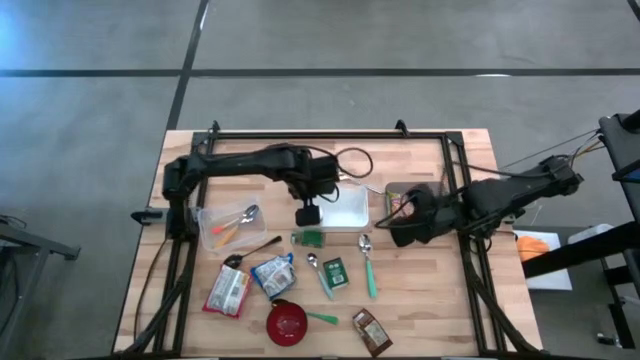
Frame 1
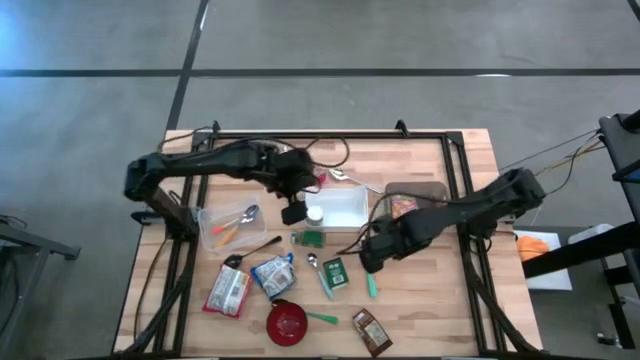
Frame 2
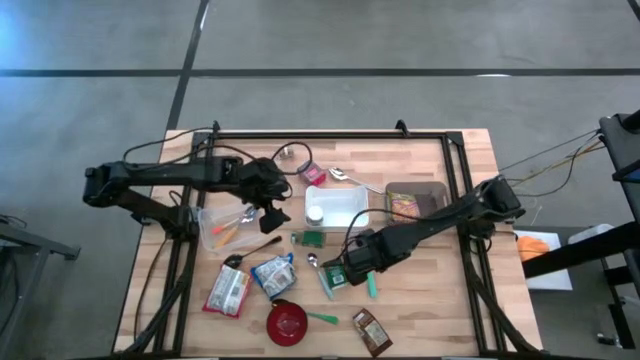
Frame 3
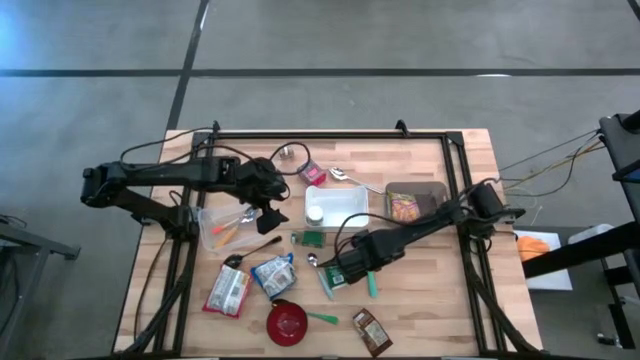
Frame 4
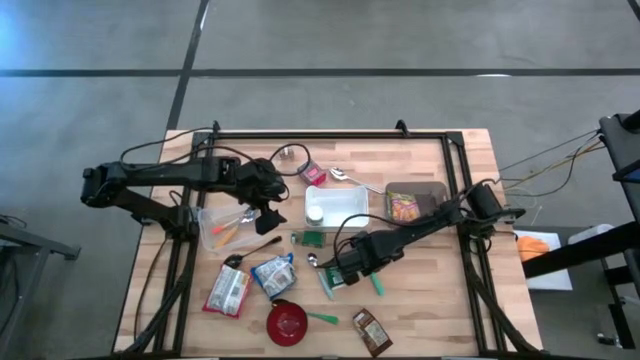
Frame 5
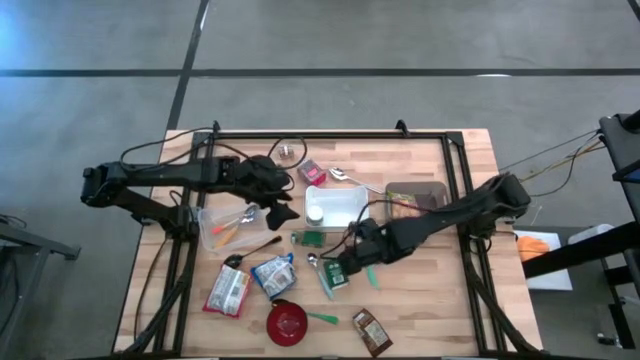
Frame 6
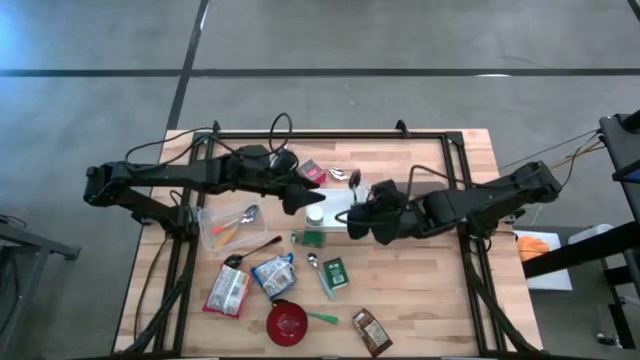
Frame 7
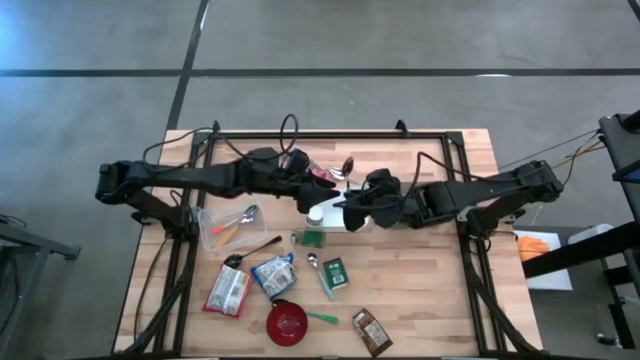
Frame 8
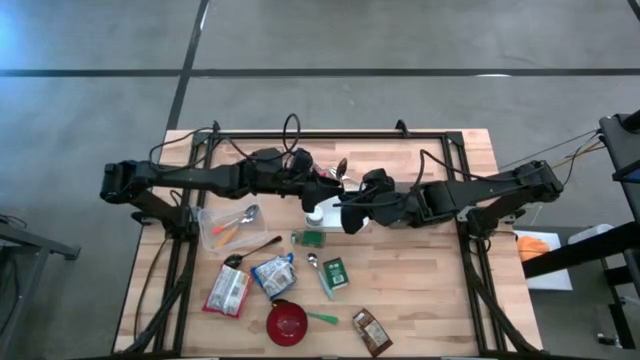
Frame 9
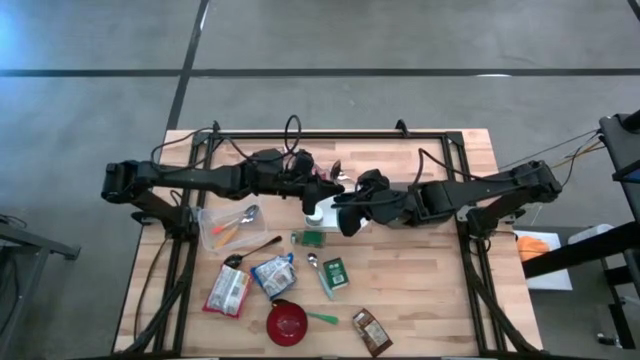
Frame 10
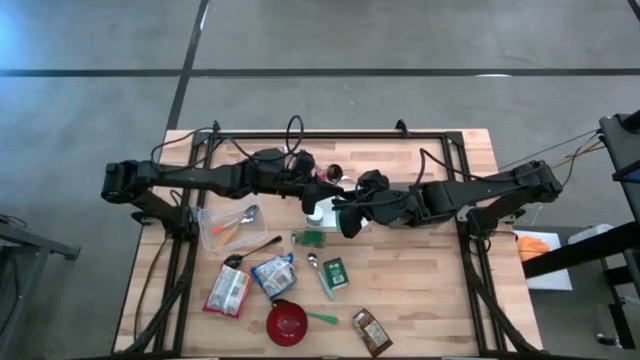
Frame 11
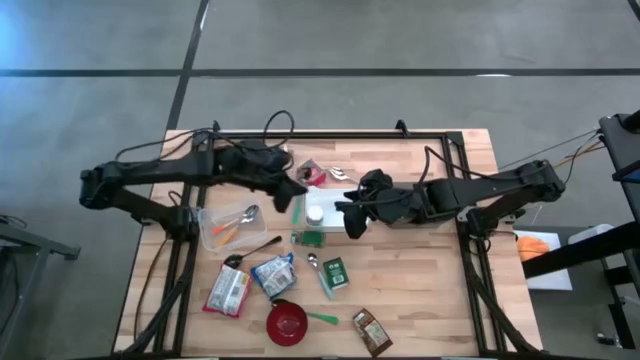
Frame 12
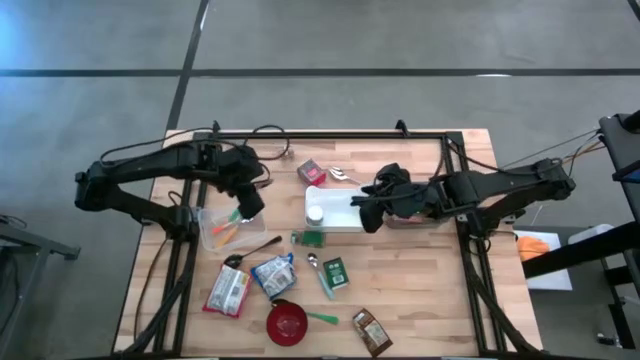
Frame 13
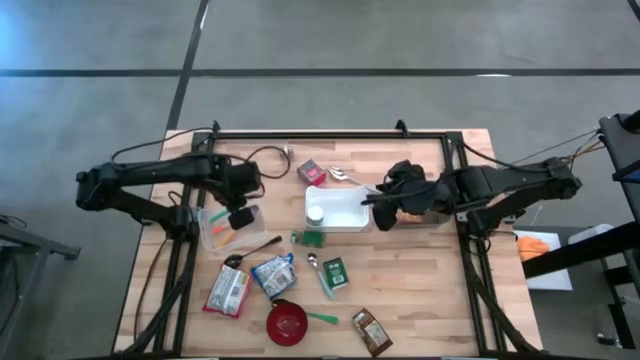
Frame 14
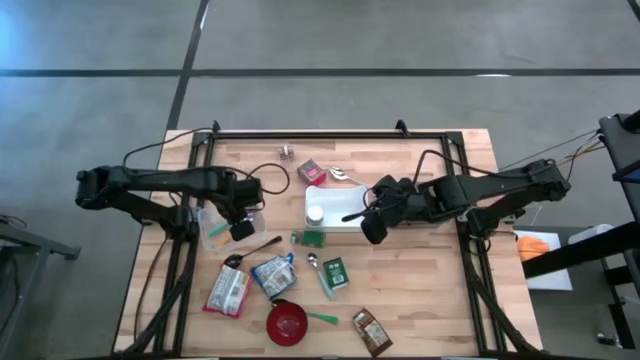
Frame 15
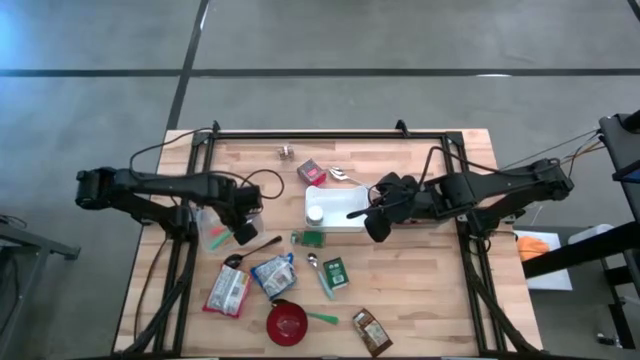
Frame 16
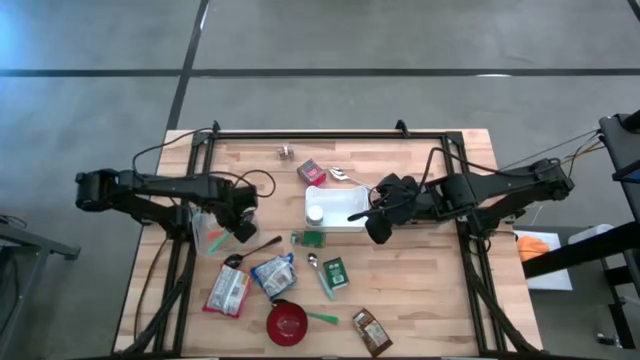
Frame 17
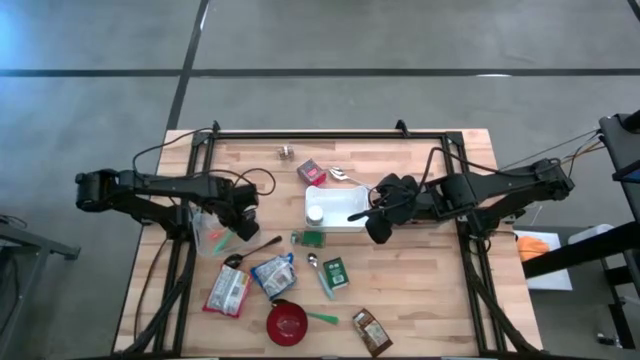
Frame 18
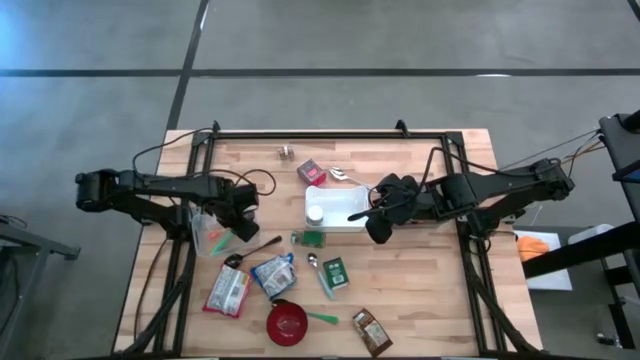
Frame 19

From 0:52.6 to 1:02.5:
Put the light green spoon into the transparent bin

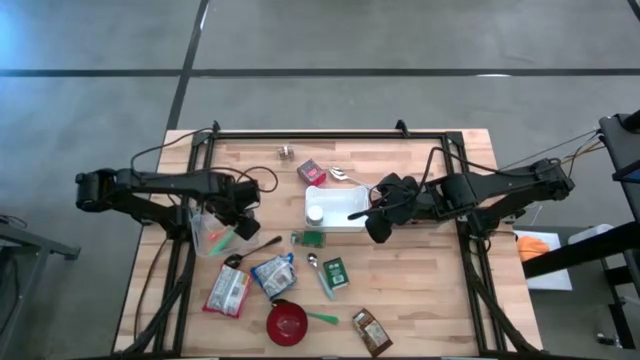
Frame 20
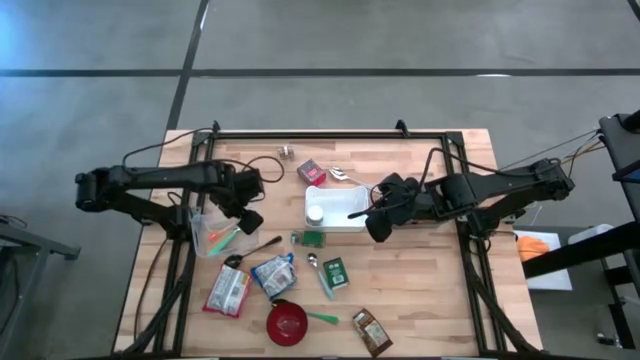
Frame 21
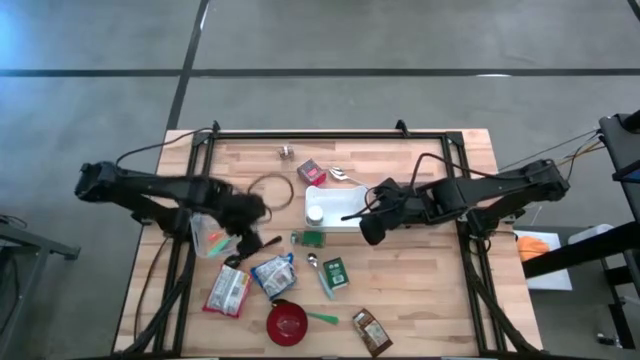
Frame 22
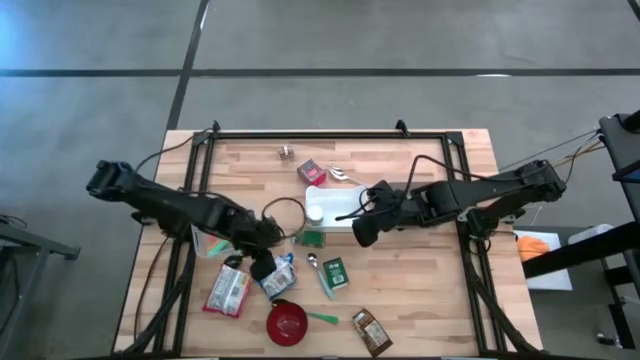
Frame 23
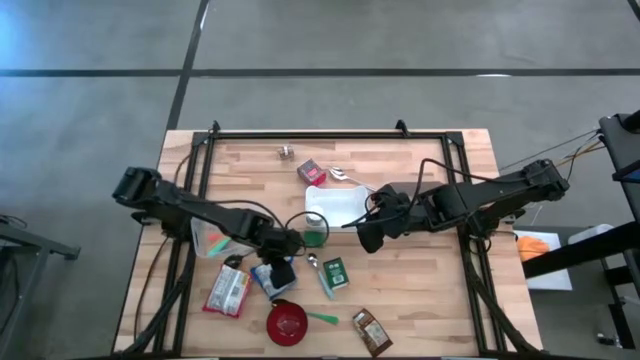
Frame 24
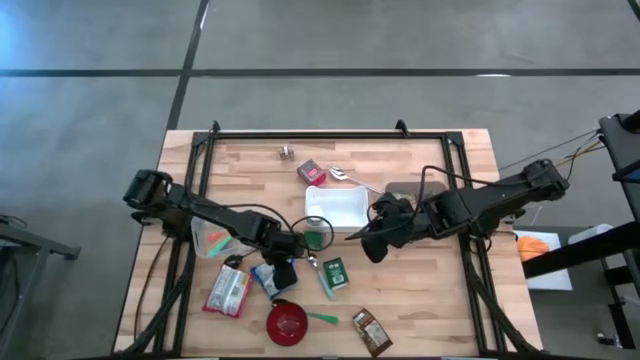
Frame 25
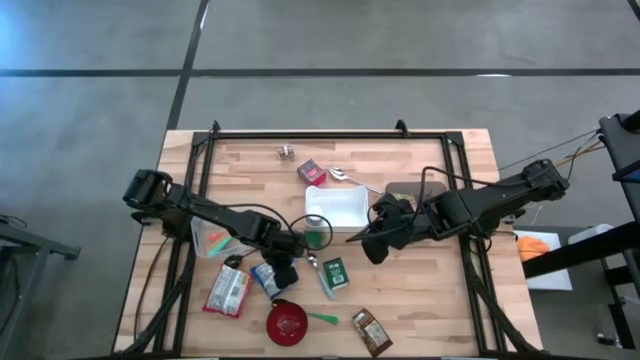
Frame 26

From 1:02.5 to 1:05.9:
Put the blue noodle pack into the black bin
